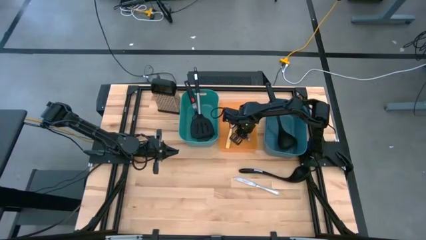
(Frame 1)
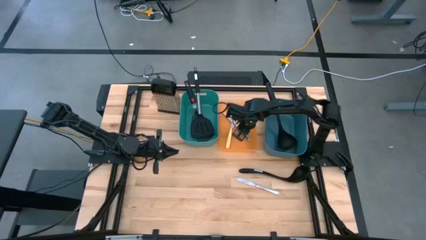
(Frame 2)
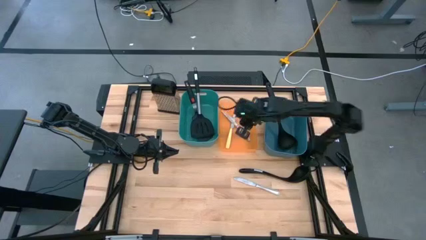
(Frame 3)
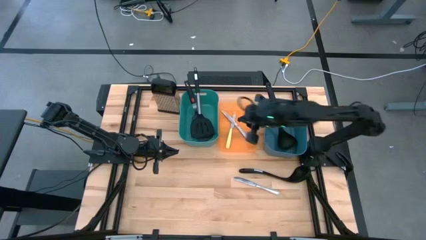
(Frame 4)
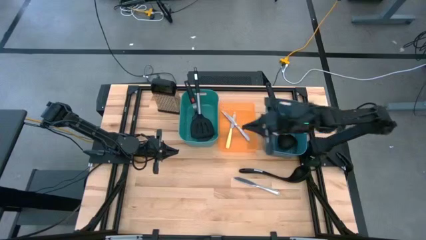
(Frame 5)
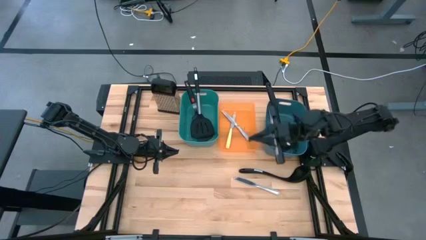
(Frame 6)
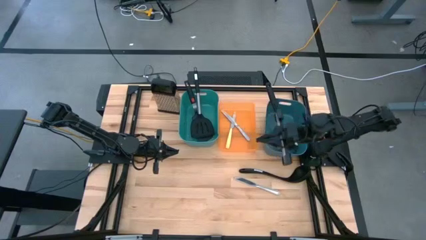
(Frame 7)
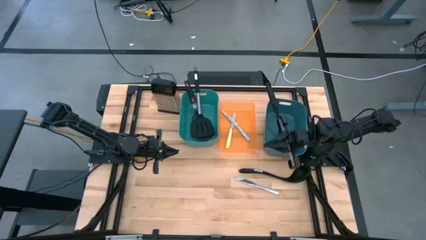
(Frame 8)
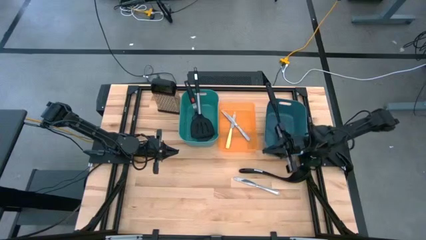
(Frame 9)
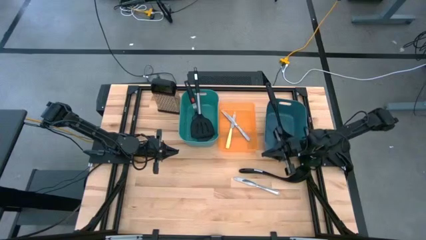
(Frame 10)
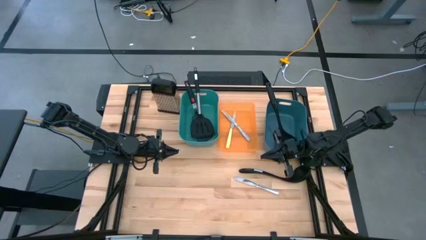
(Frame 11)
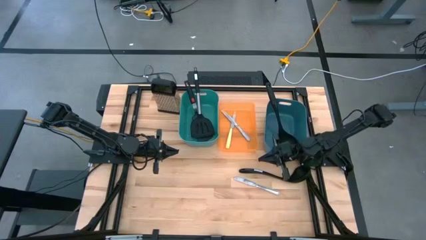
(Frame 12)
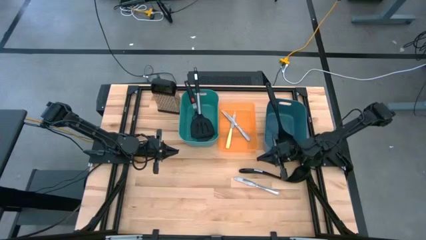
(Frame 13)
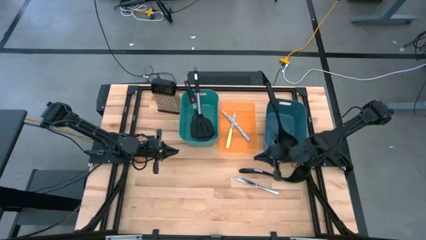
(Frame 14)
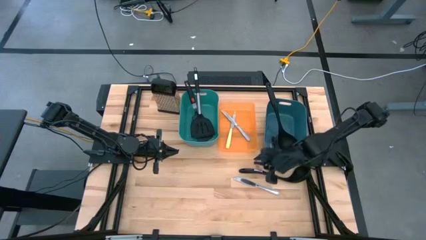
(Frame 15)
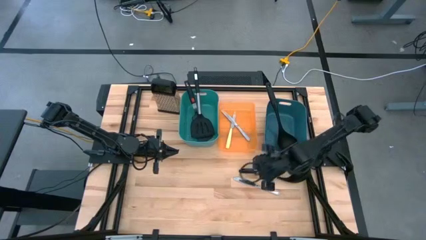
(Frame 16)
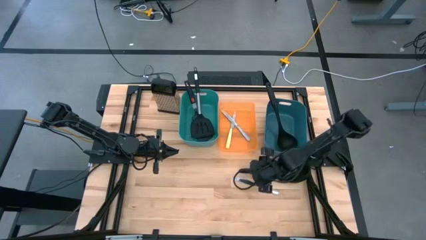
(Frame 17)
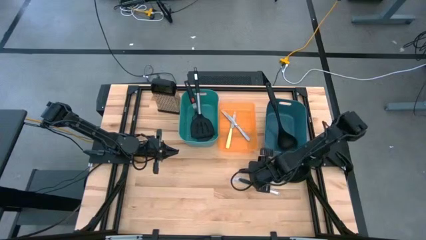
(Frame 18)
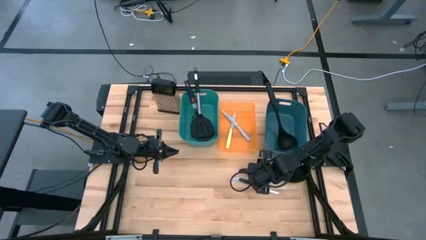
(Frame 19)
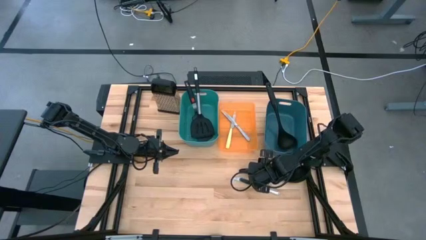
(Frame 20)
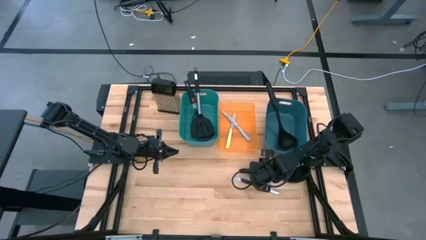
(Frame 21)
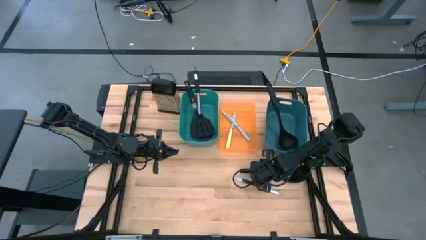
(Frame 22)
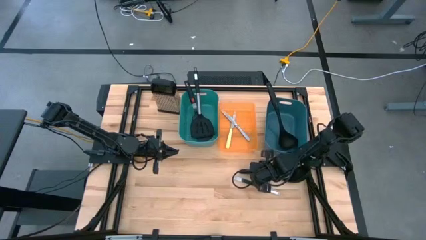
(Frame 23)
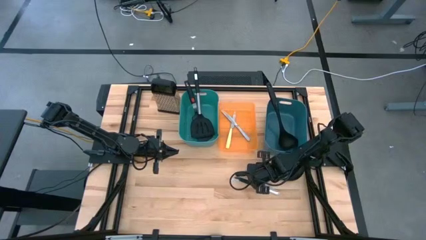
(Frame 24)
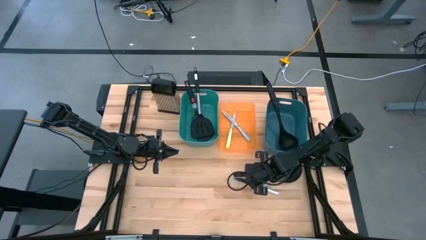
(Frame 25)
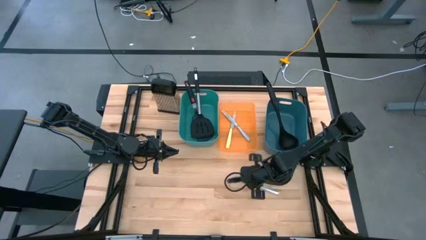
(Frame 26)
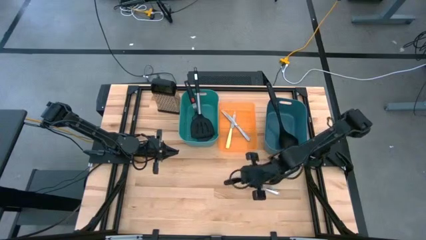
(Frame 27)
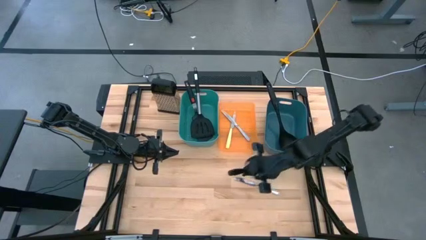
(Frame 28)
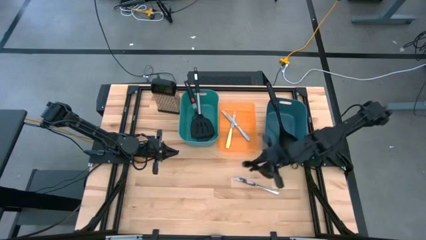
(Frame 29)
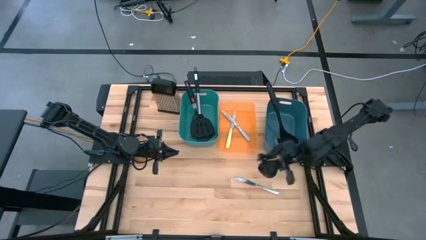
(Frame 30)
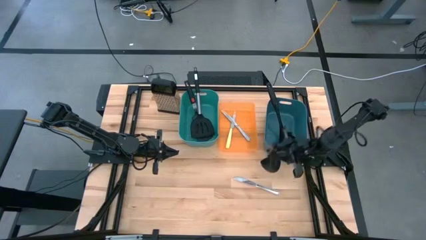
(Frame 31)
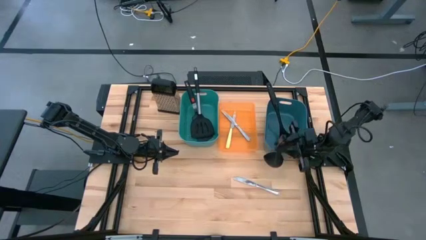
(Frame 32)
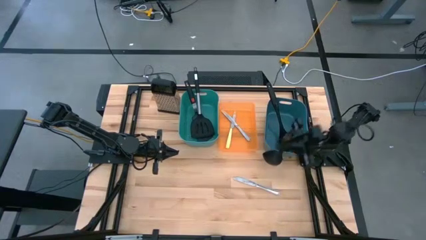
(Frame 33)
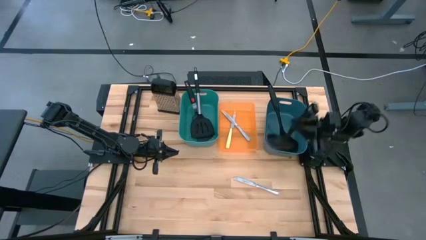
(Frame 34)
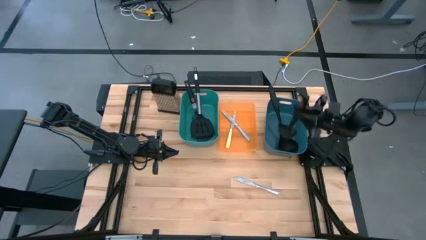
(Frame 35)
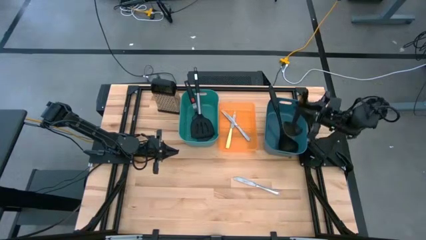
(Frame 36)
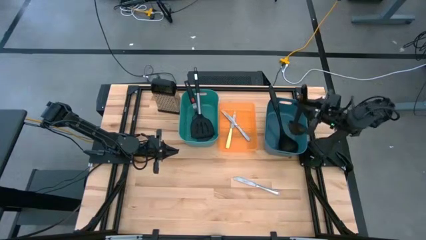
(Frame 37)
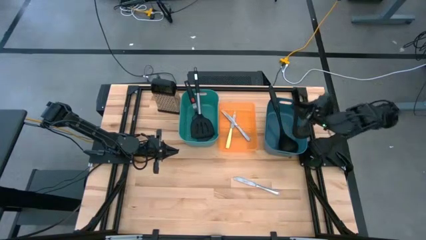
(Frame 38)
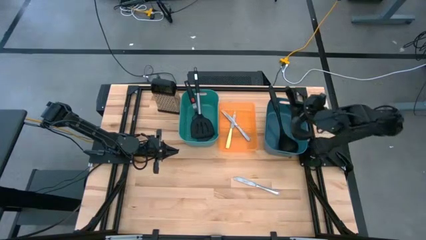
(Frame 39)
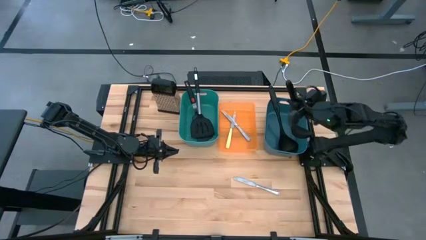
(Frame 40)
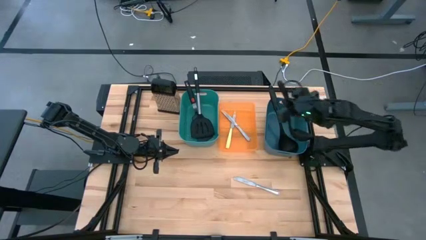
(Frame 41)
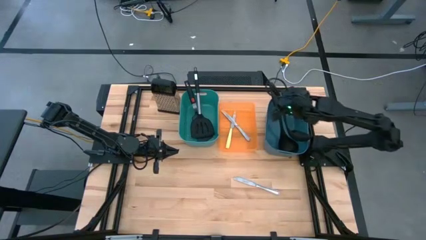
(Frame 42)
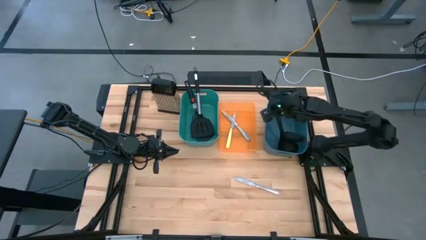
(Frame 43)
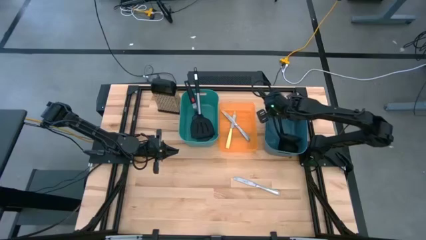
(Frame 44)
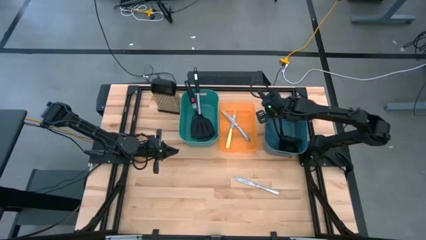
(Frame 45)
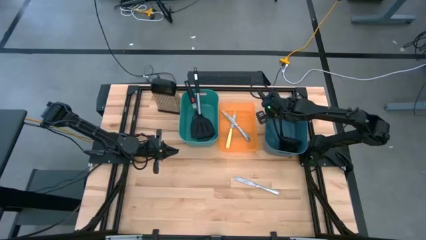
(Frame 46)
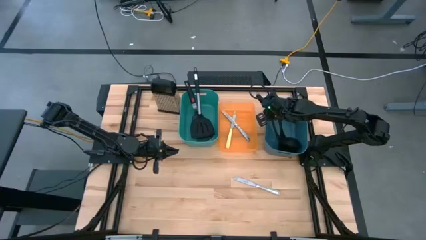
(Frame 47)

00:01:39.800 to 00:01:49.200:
Task: Pick & Place Kitchen Items
Put the black serving spoon into the blue bin

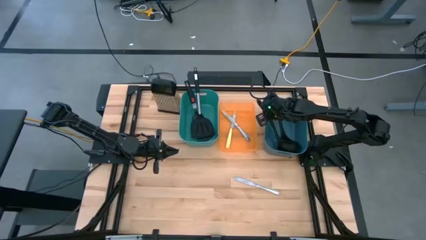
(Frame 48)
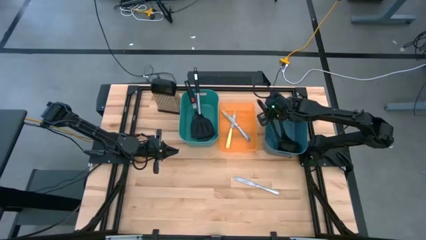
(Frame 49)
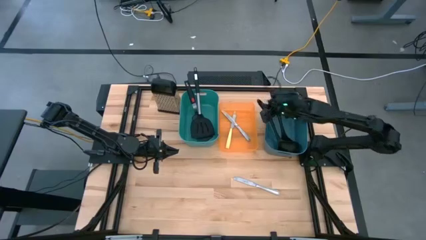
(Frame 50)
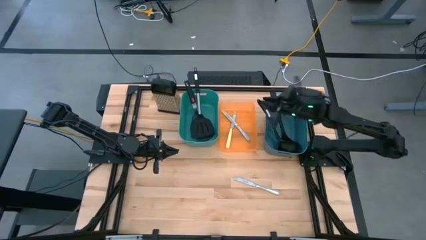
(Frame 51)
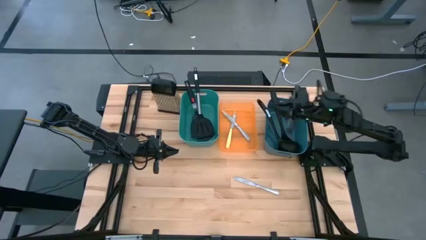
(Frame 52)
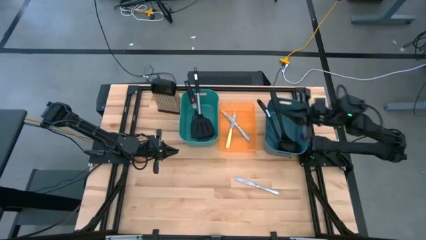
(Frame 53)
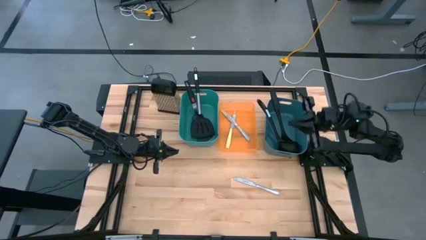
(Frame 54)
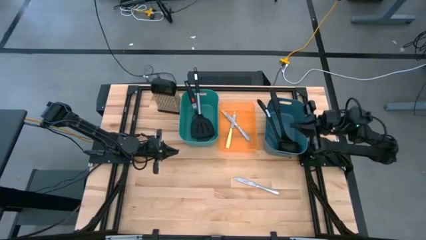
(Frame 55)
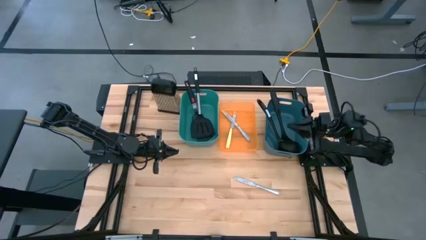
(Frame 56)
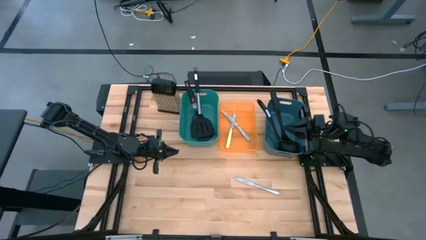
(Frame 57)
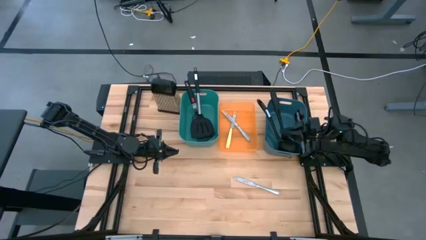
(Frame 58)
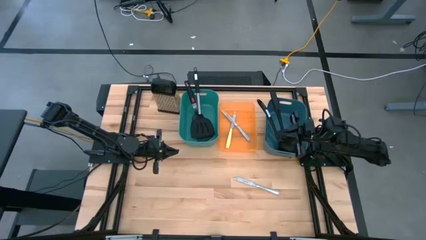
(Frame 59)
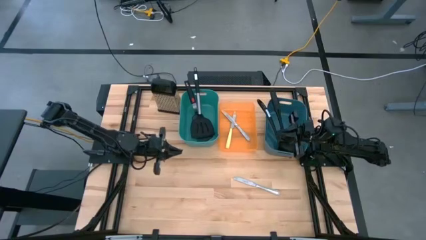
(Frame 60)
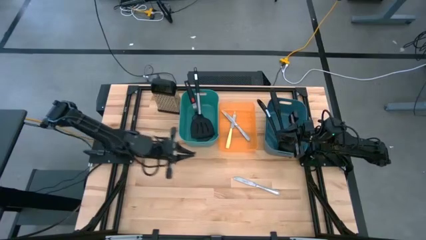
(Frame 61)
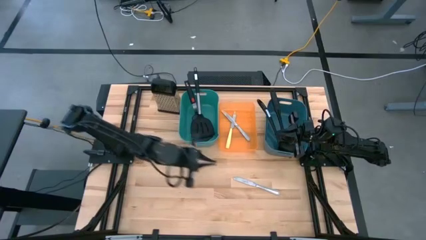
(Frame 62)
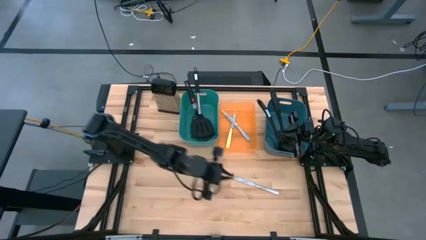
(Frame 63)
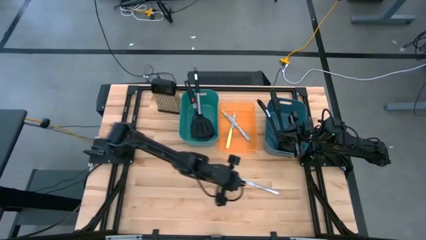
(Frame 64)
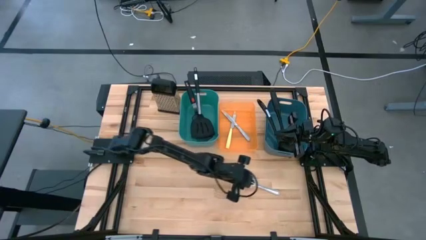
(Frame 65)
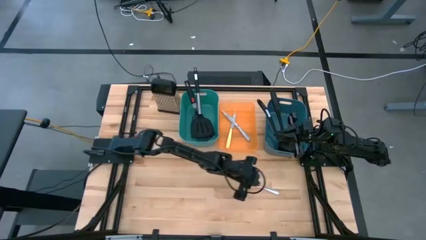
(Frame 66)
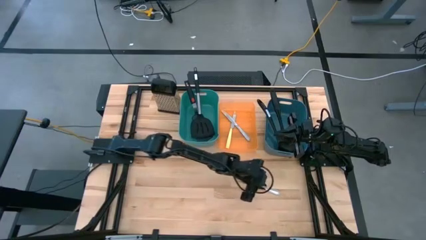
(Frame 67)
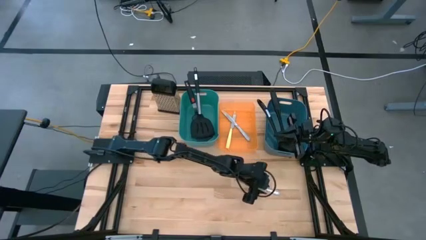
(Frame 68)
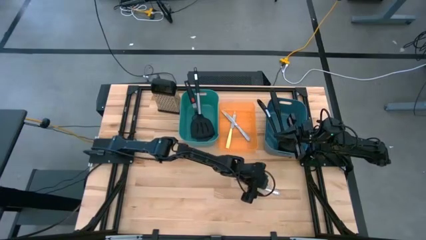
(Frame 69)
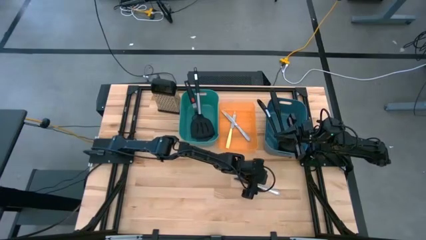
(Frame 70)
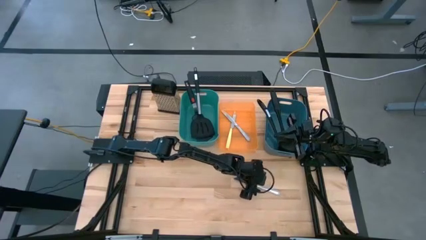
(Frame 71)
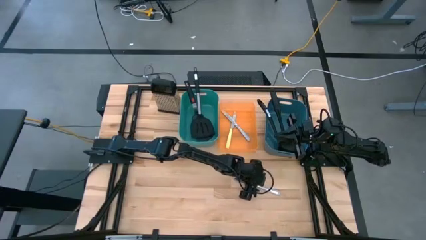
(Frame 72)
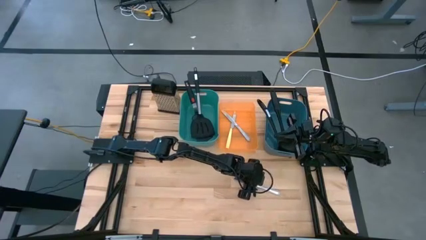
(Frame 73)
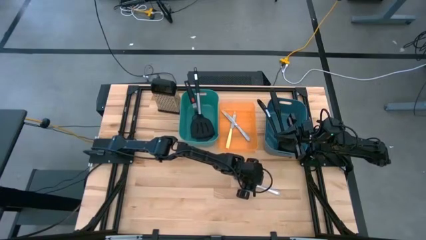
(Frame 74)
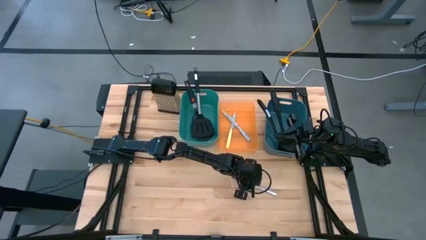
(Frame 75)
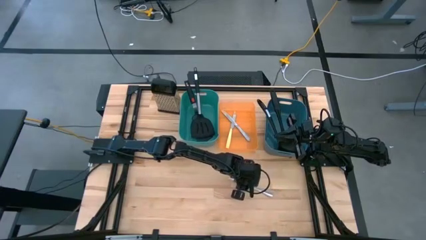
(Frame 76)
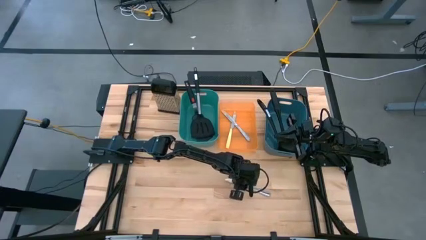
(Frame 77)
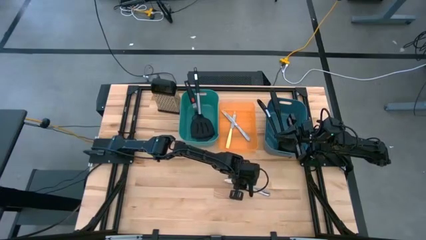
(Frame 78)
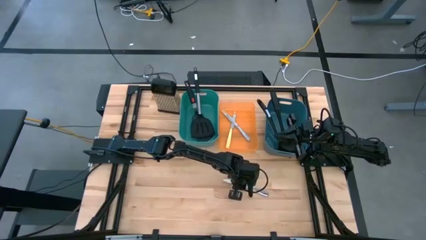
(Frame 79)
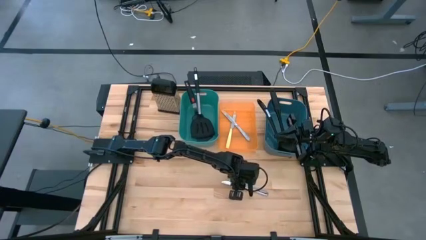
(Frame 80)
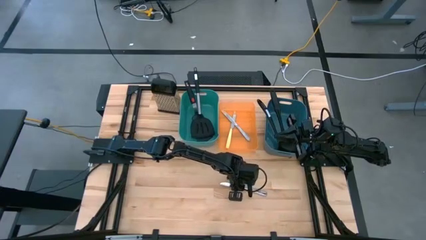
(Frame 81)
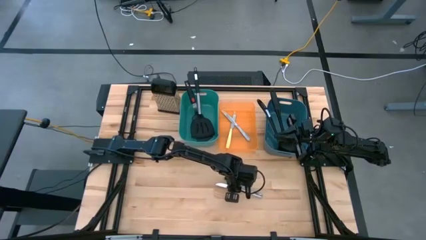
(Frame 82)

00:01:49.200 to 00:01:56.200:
Put the silver table knife into the orange bin
